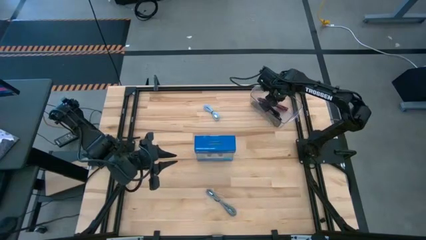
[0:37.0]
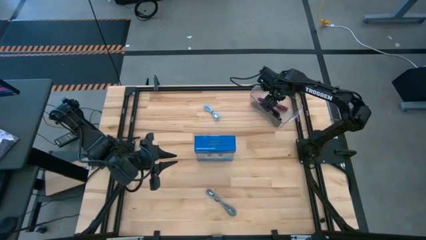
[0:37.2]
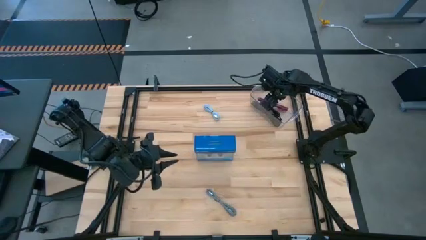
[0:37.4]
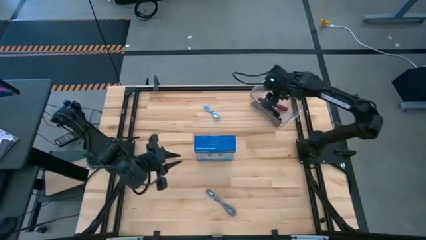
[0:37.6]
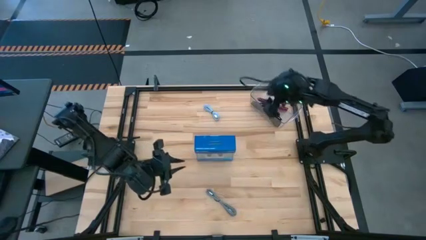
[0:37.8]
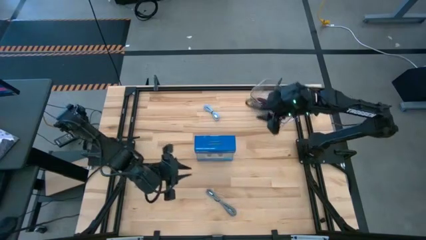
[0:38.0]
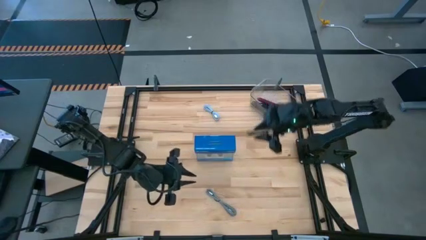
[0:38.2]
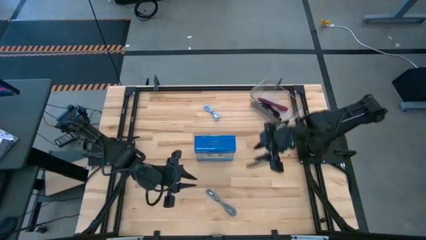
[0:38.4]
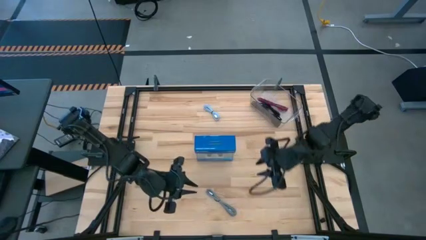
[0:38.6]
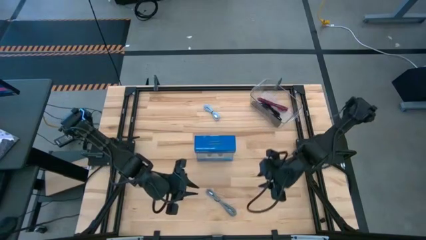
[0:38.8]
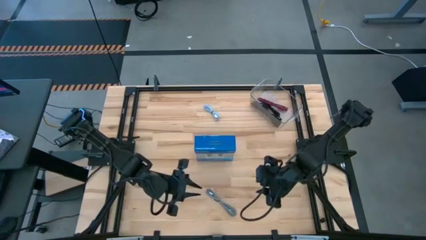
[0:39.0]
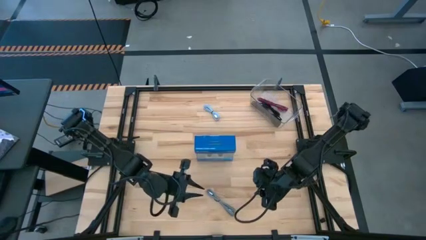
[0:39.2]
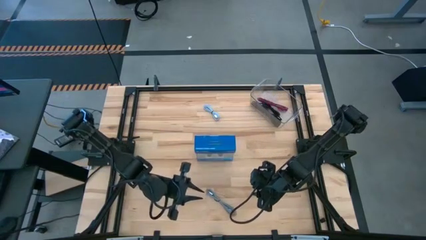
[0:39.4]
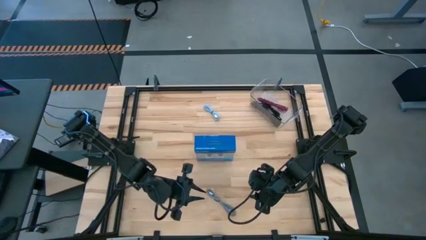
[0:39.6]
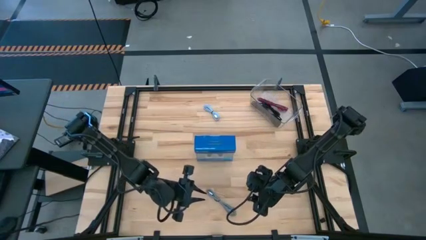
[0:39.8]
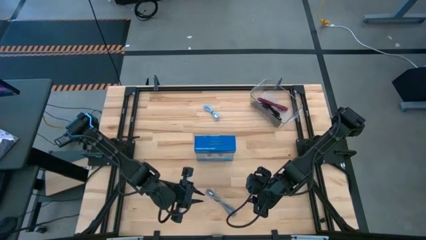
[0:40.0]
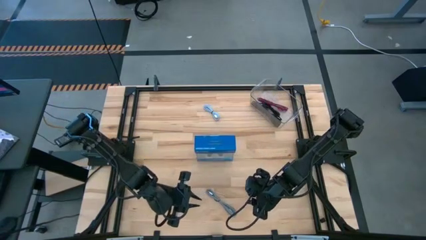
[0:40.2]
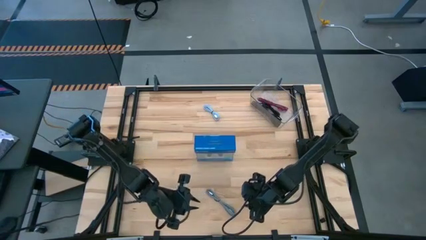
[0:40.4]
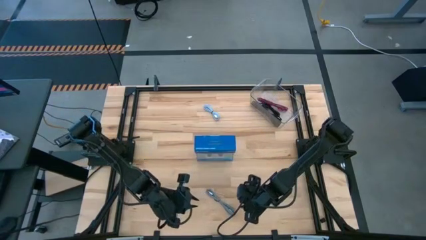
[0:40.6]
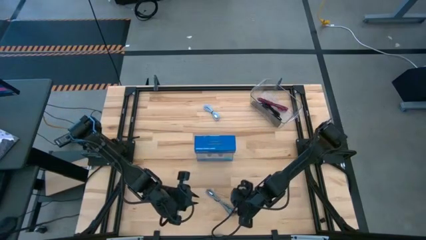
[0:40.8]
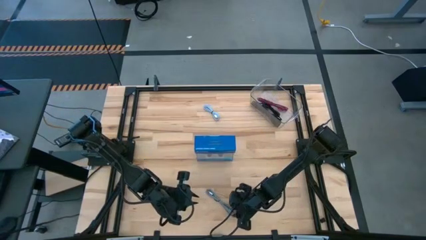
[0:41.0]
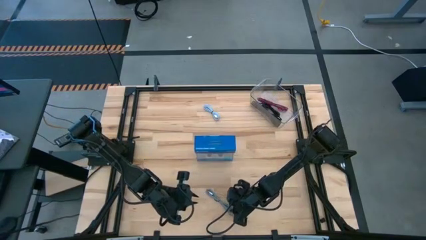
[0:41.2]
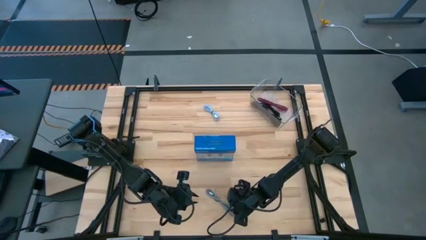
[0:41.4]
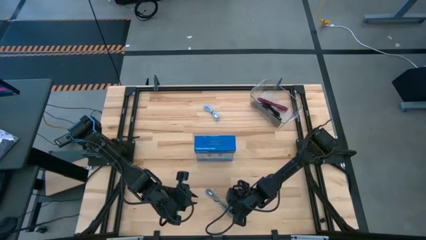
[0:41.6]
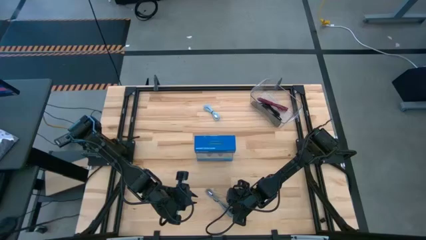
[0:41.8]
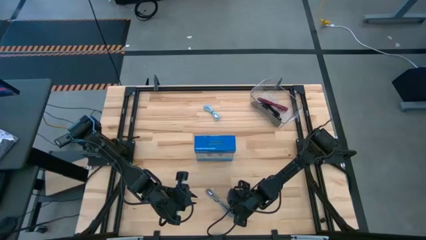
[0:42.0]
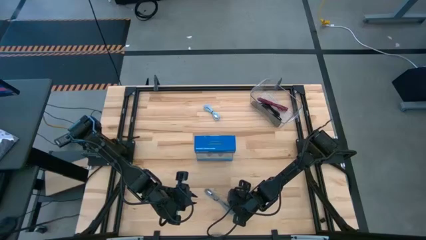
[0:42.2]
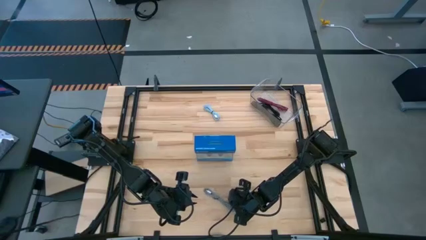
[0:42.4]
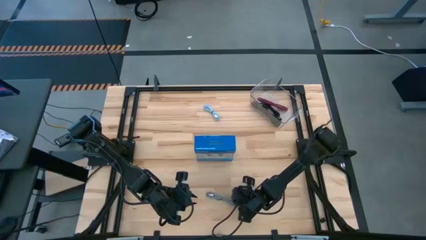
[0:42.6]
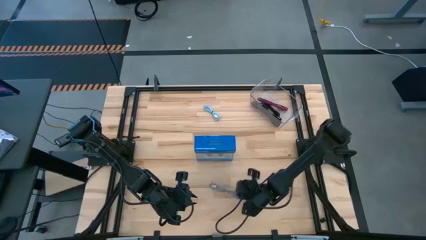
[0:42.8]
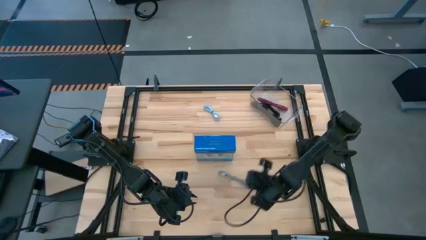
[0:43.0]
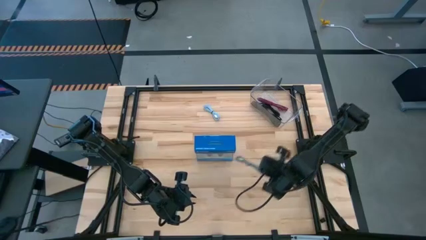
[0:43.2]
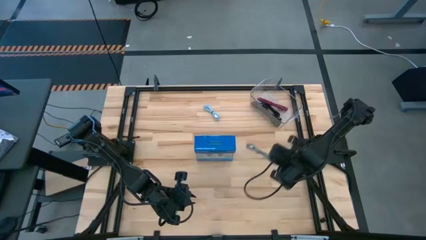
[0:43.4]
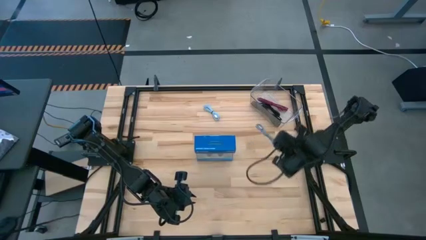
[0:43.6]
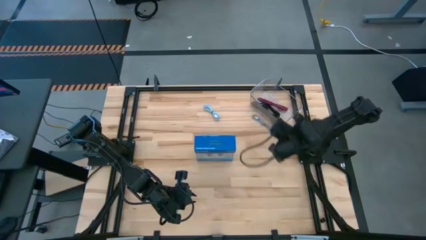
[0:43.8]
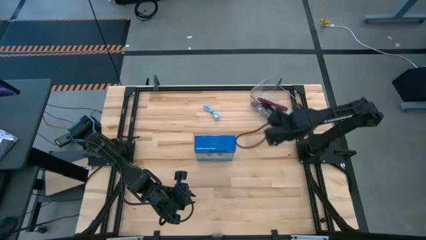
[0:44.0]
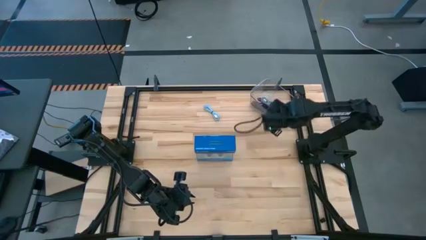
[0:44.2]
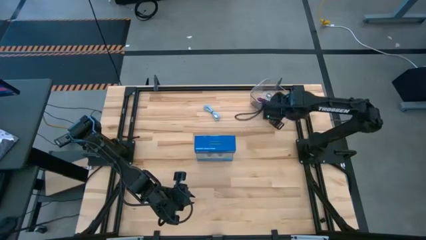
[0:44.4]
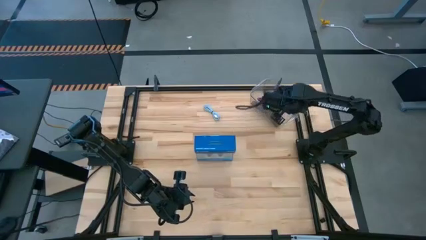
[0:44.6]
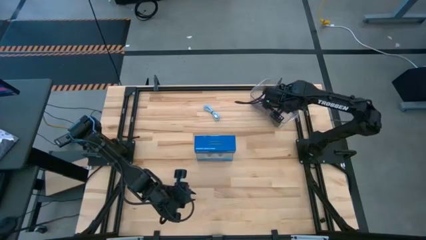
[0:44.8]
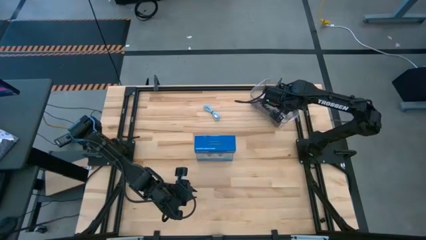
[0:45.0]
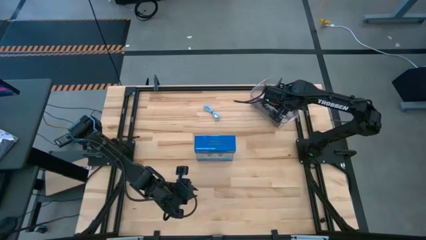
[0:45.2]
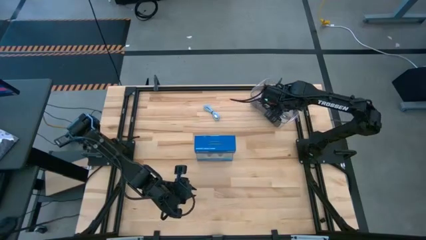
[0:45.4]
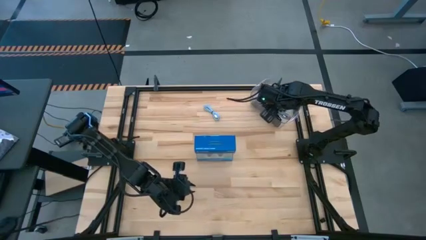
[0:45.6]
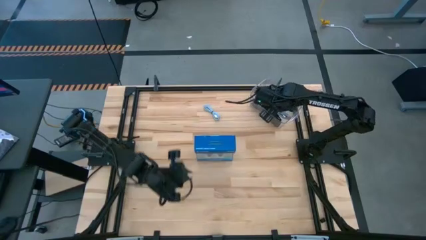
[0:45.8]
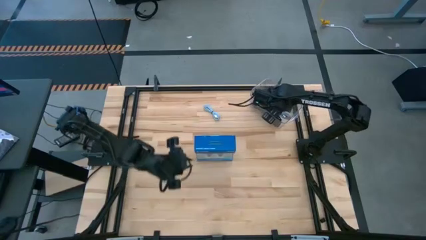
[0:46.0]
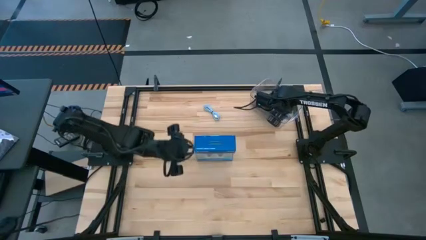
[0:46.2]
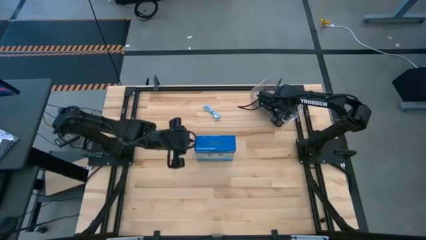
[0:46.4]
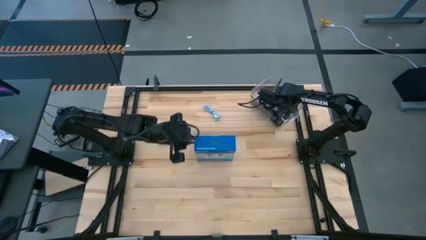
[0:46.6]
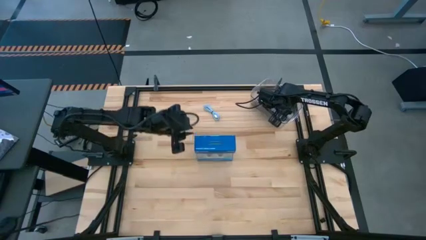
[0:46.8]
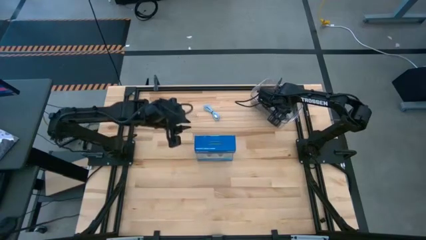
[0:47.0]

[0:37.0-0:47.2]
Task: Pick and place USB-C Cables
Put the white charger cable into the container

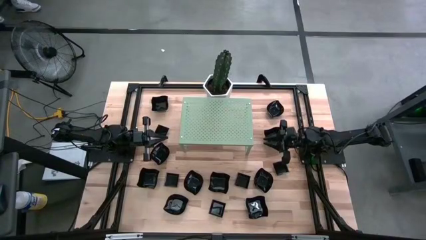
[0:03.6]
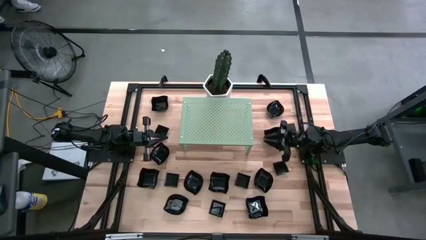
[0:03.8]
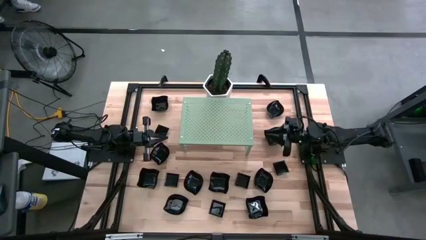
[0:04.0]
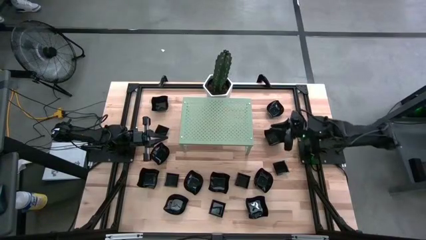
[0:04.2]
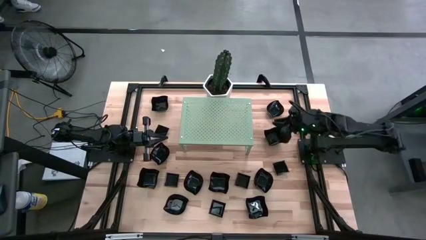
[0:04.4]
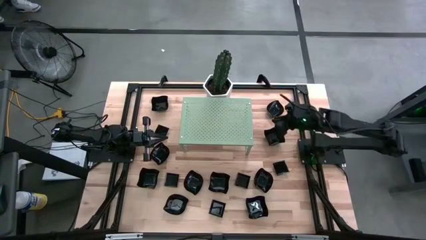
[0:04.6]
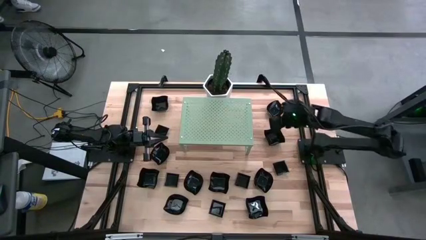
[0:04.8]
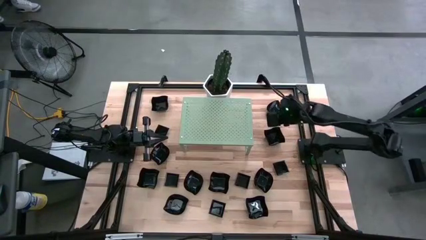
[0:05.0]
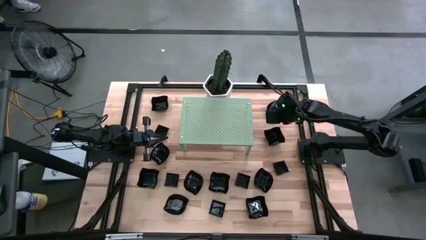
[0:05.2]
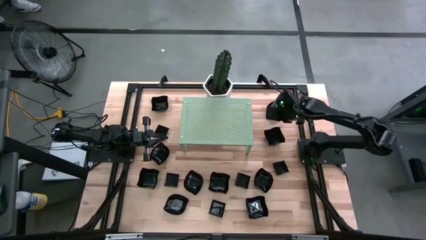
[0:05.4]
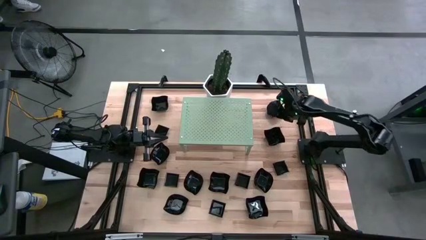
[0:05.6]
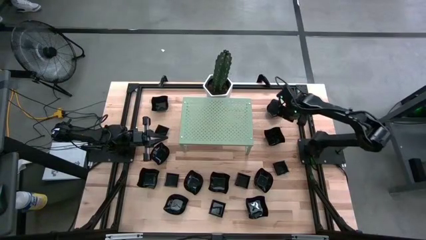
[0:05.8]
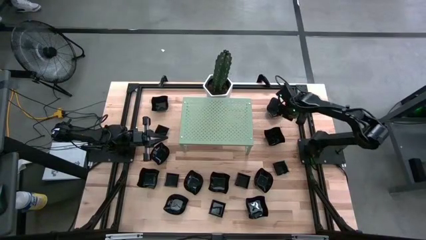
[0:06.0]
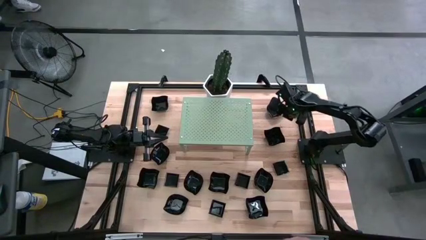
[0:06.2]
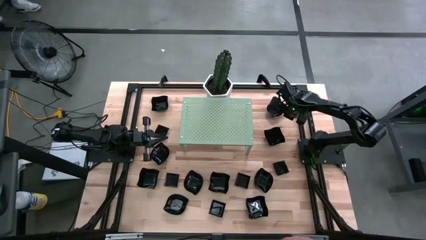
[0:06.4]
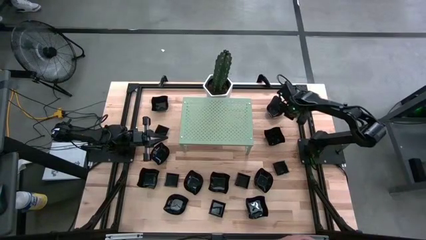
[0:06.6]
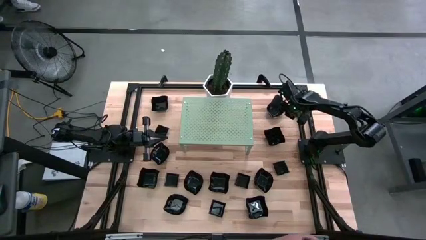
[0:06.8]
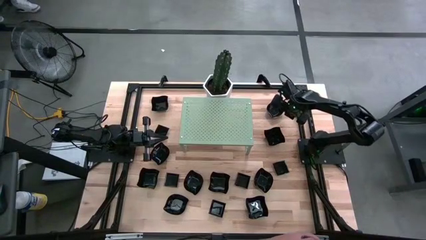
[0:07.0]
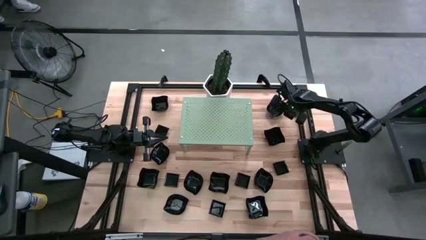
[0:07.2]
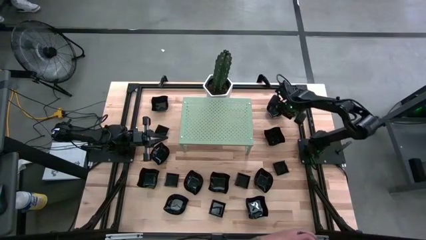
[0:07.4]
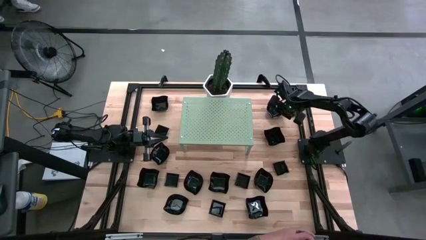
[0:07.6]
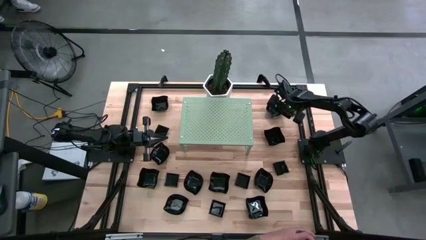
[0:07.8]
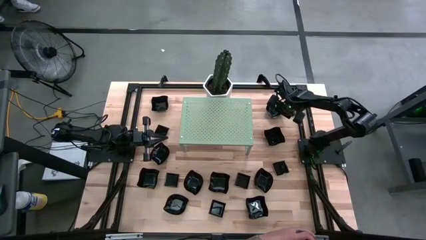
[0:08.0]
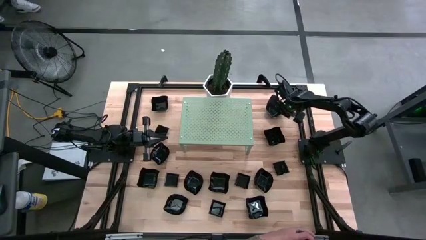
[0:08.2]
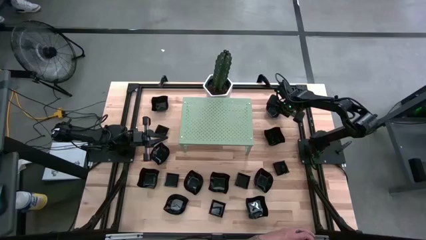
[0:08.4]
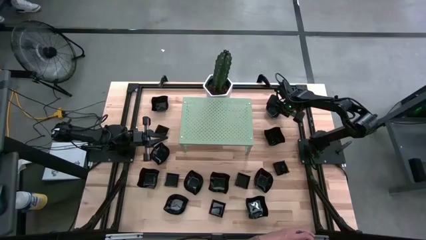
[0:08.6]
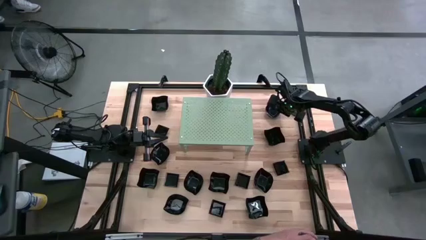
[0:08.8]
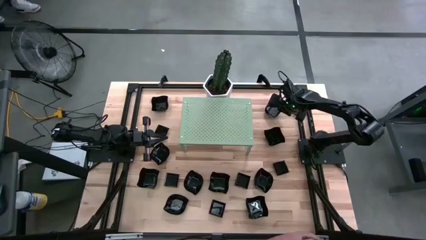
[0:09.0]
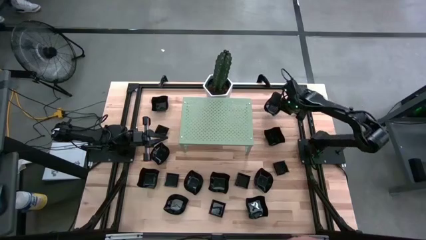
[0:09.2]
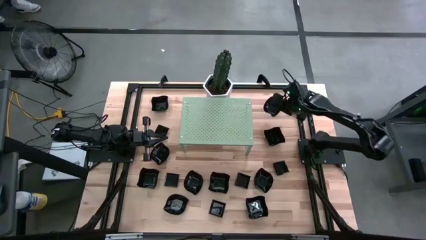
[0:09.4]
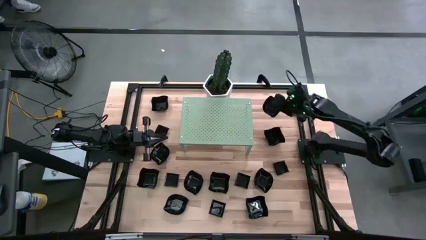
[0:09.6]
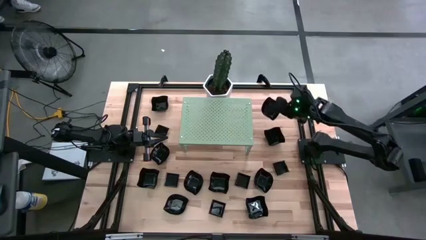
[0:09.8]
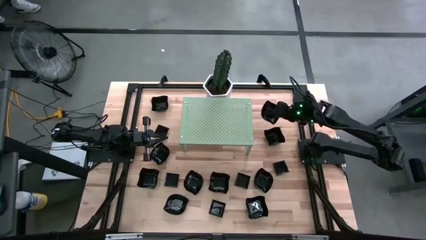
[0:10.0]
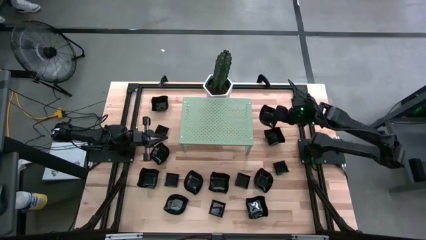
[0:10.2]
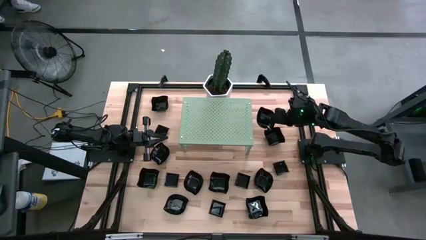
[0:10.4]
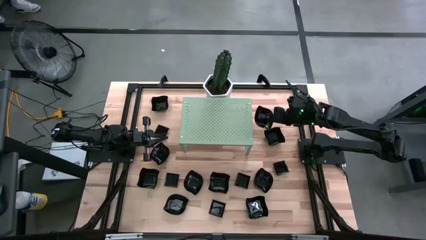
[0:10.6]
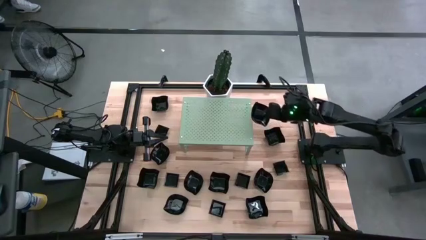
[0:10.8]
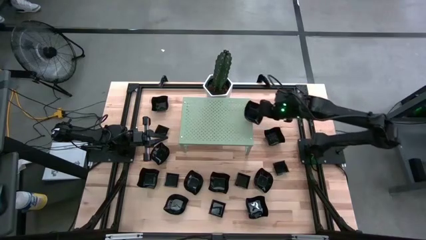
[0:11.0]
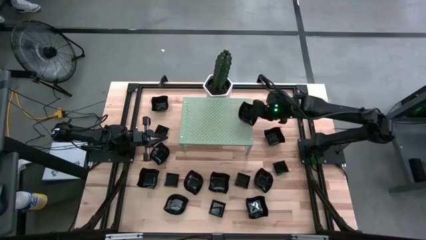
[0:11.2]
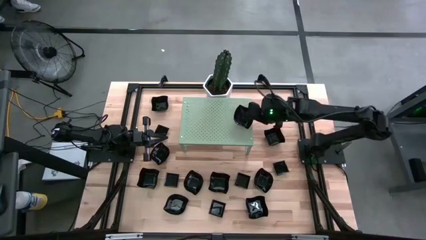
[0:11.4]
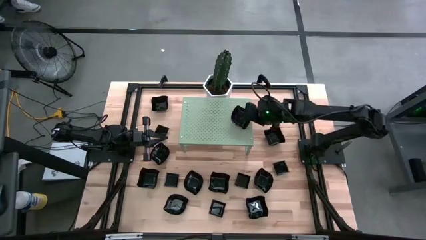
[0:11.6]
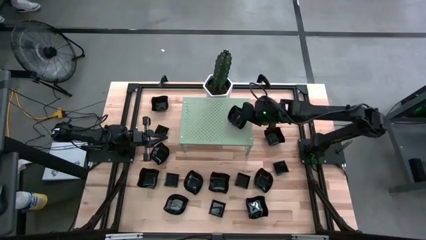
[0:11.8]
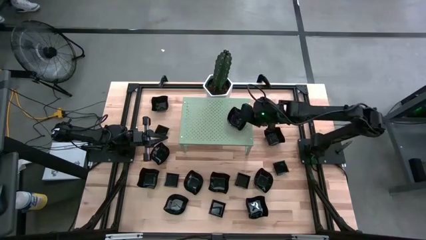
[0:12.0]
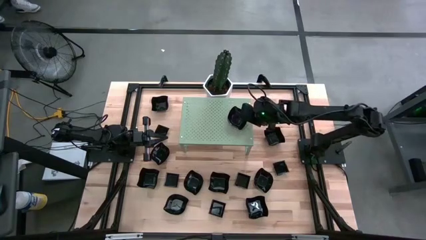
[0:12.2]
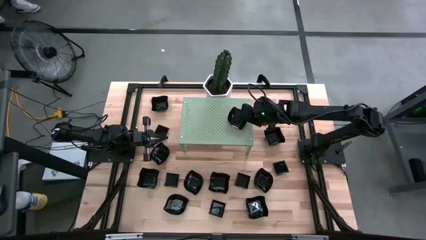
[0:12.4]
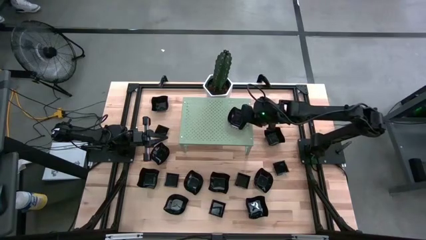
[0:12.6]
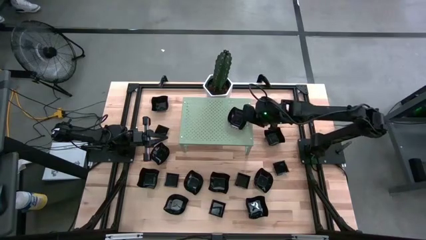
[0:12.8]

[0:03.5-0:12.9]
Task: Pick & Place Mini shaped plates
Put the leaf shaped plate on the shelf
